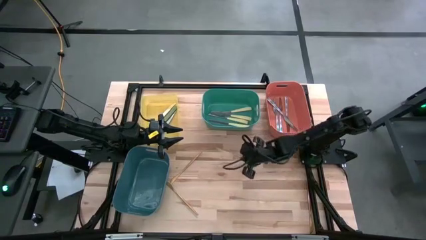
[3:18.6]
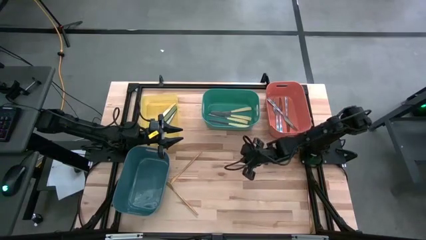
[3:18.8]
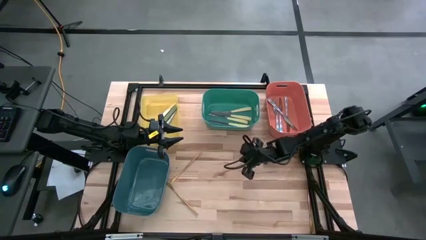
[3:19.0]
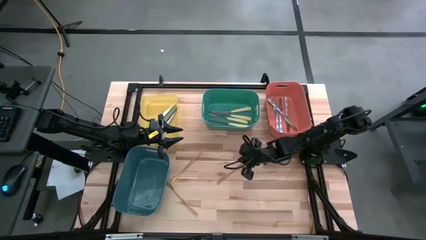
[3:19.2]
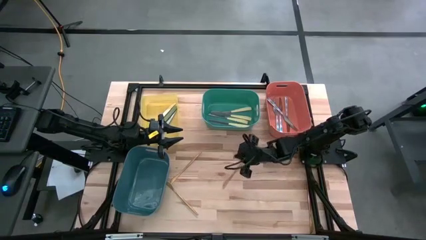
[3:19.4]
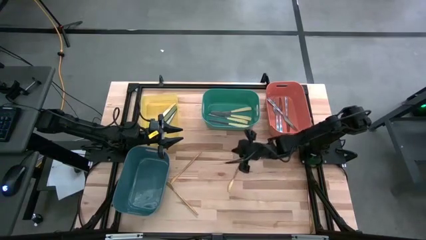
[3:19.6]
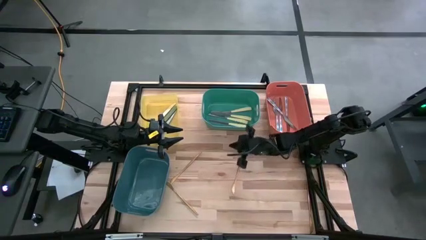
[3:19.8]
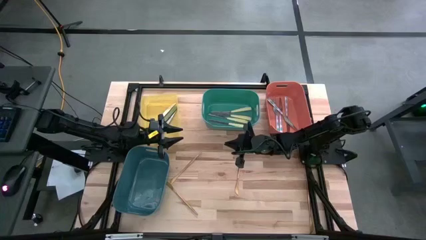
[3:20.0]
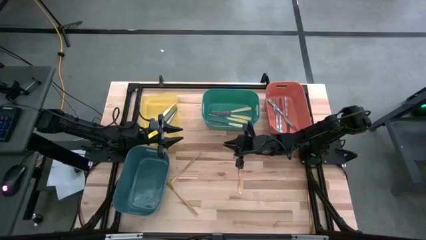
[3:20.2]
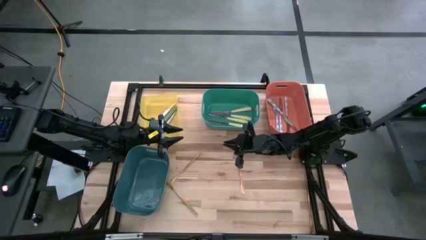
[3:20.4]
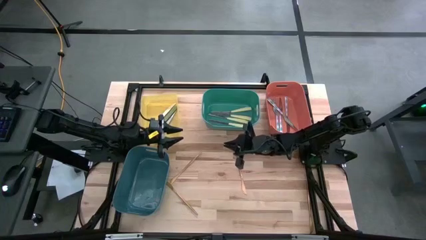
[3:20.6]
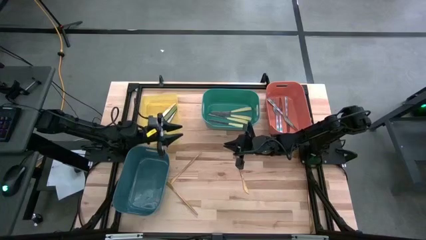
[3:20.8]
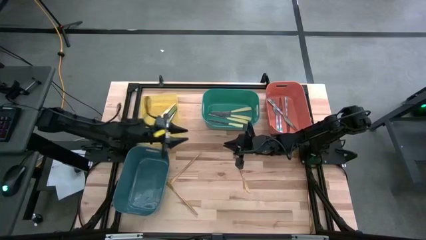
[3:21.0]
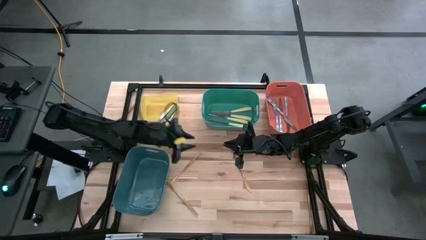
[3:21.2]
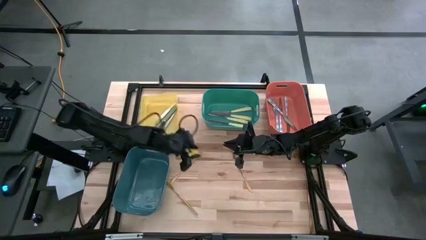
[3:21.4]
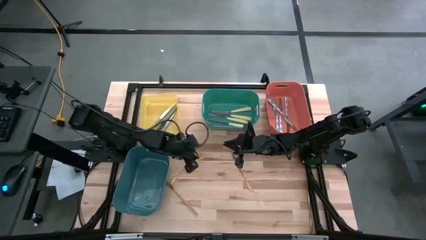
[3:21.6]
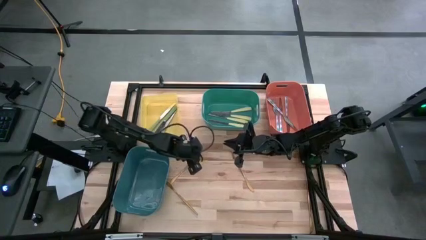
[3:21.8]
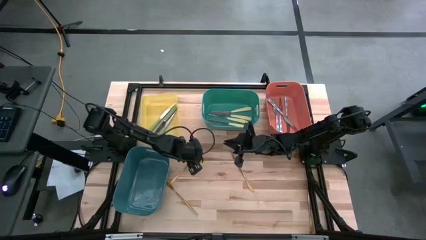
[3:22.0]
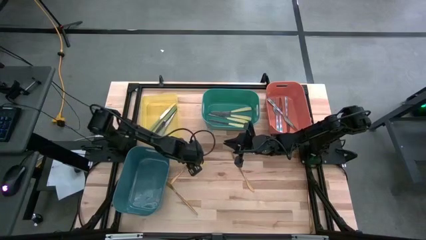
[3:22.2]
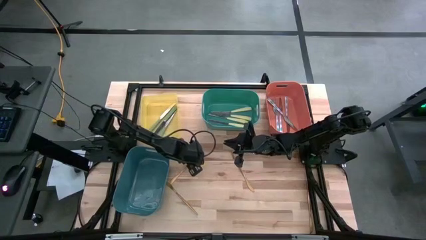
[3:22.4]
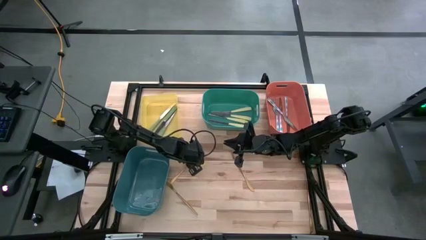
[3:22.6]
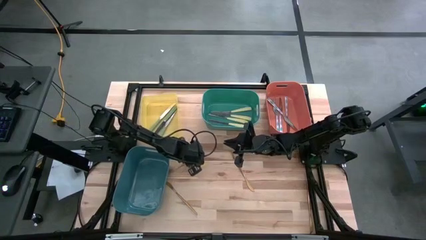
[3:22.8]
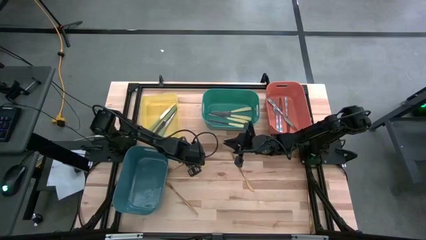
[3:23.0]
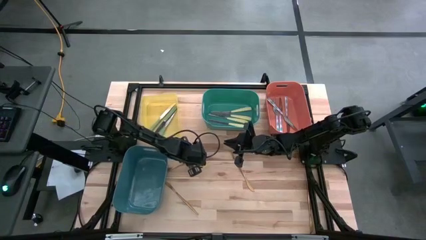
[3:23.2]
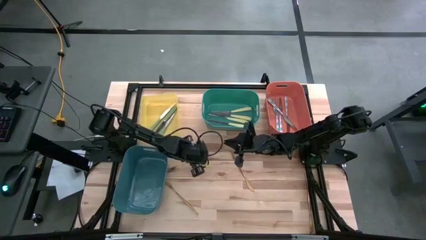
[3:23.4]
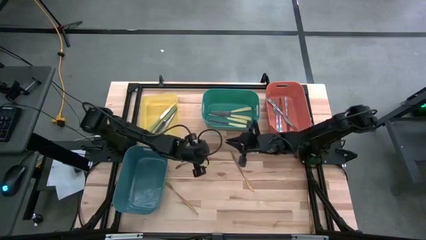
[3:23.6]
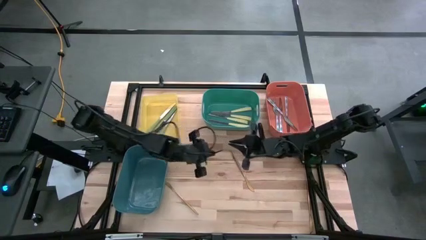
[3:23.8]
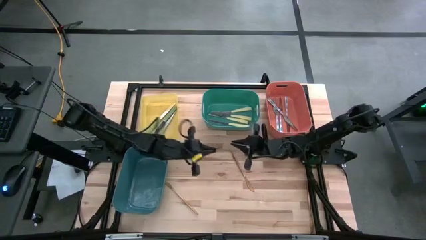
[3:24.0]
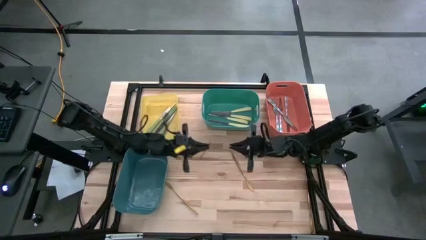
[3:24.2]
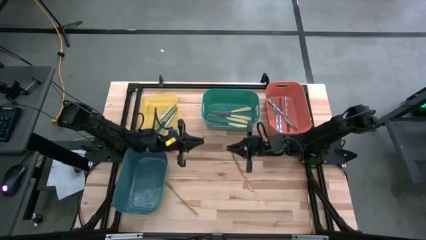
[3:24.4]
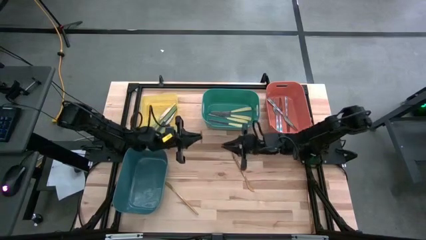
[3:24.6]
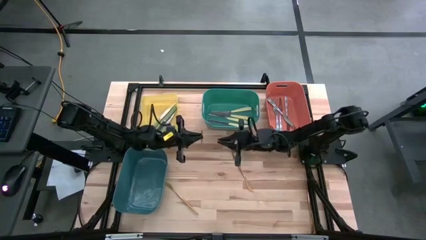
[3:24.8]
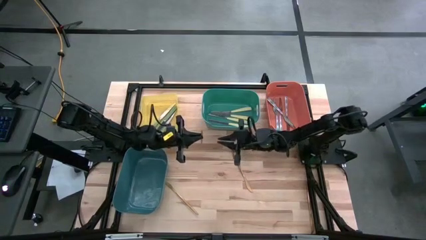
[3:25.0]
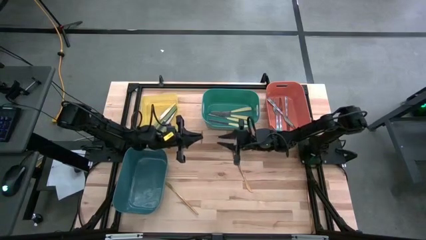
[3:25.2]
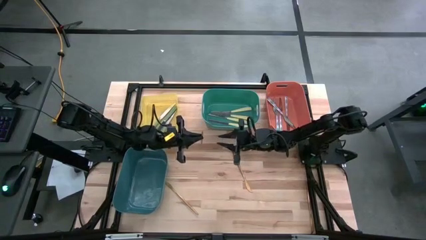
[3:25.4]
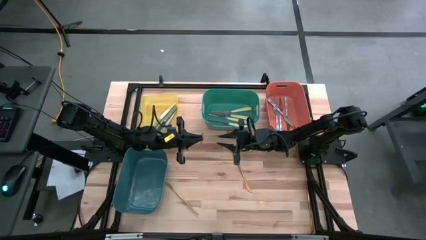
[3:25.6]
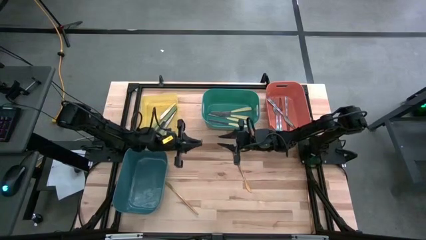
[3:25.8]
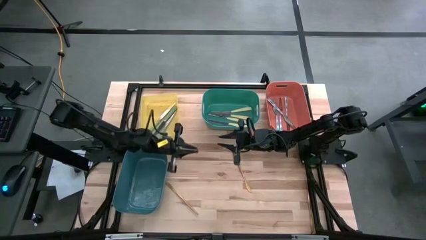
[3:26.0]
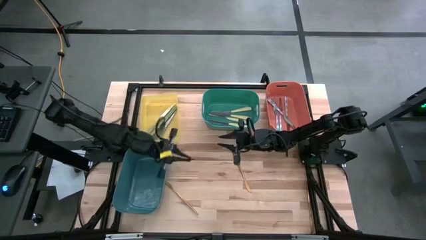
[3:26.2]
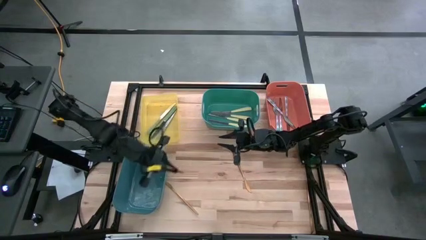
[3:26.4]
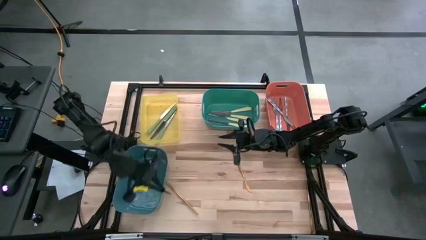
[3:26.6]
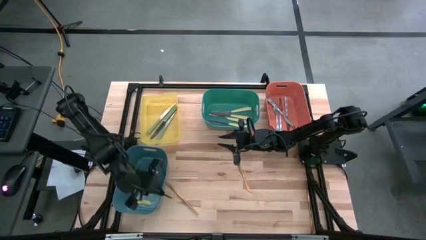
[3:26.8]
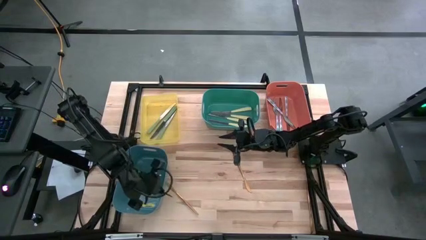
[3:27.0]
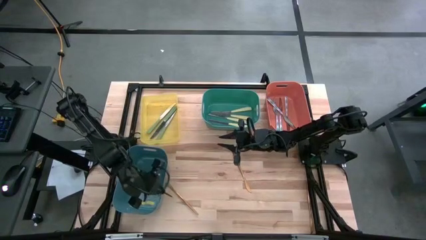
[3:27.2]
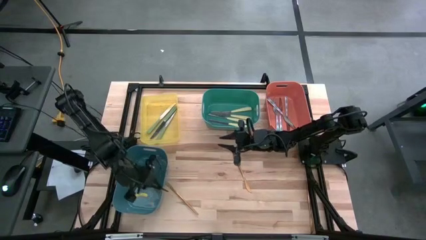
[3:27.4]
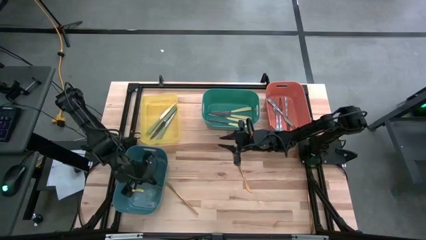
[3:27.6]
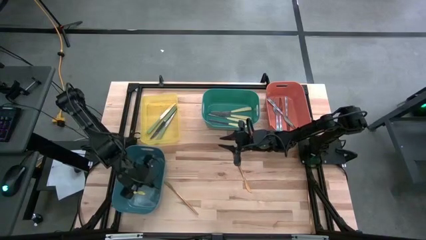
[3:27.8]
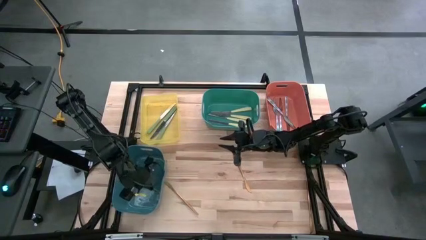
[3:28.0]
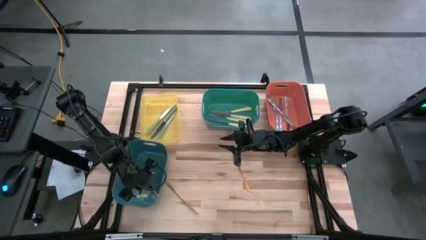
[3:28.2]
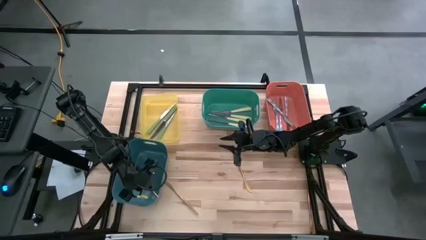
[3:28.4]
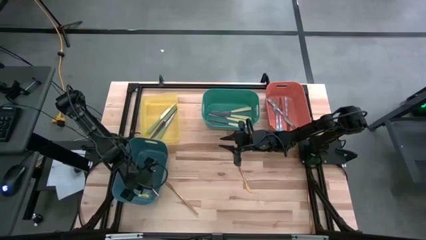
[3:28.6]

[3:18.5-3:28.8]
Task: Sort silverware by color (type)
Put the gold knife into the blue bin
